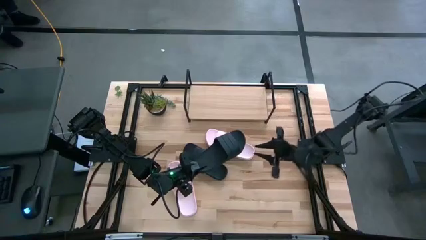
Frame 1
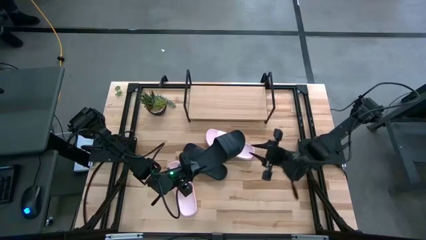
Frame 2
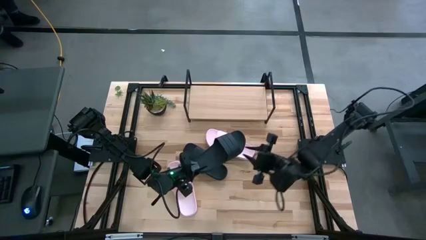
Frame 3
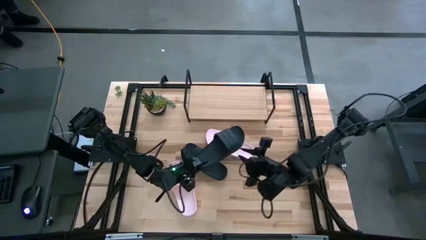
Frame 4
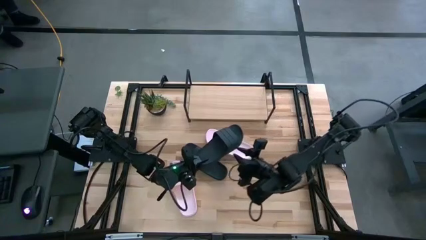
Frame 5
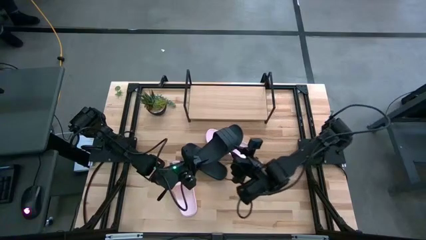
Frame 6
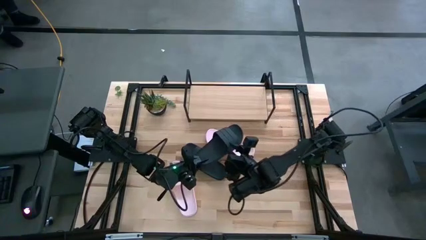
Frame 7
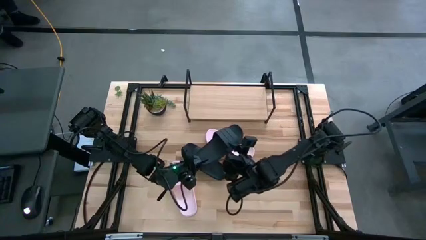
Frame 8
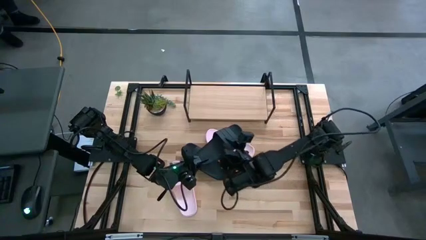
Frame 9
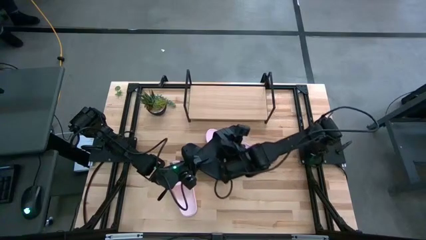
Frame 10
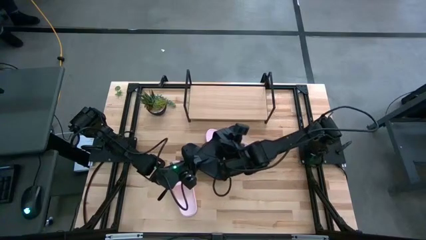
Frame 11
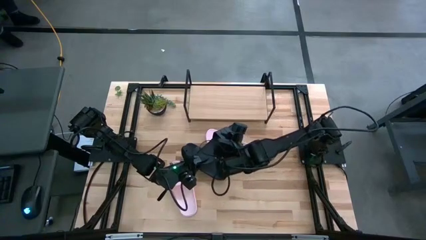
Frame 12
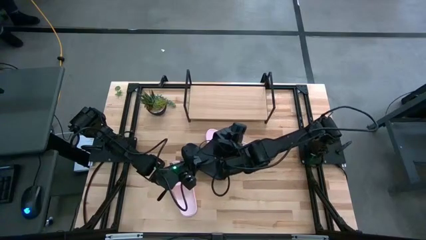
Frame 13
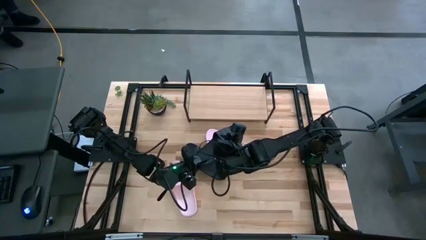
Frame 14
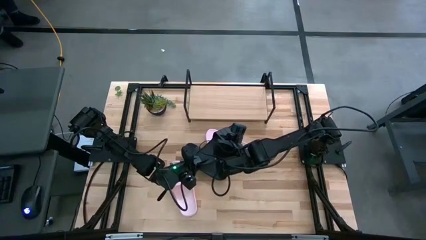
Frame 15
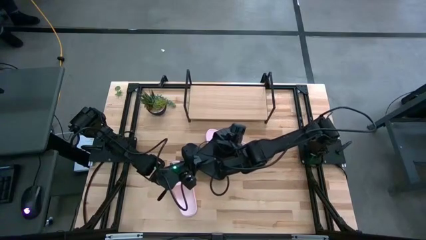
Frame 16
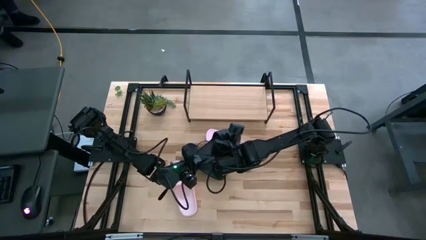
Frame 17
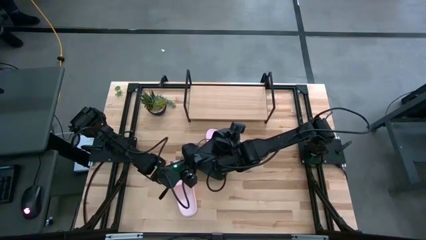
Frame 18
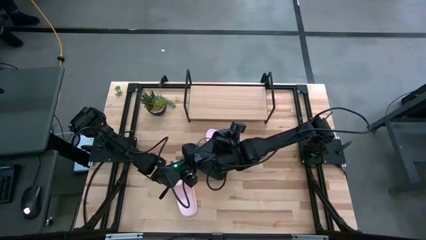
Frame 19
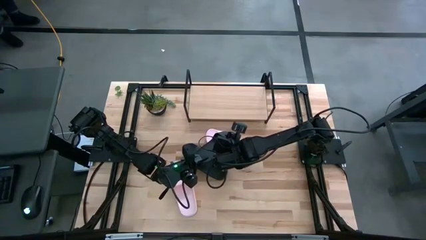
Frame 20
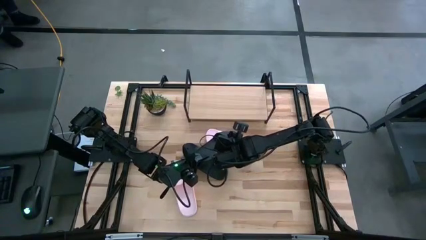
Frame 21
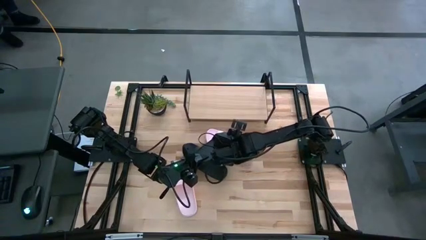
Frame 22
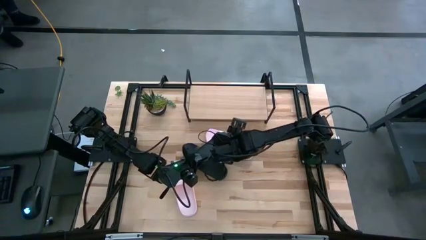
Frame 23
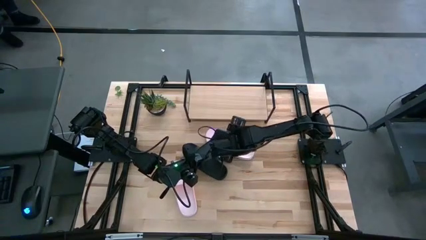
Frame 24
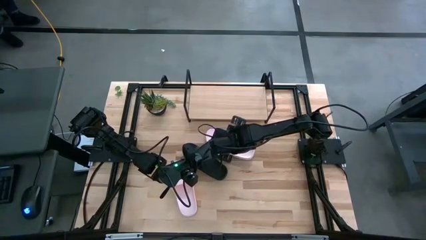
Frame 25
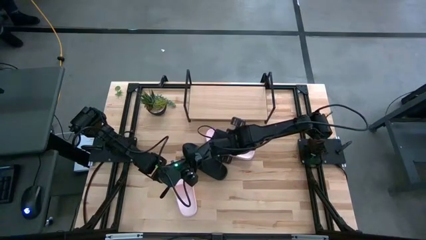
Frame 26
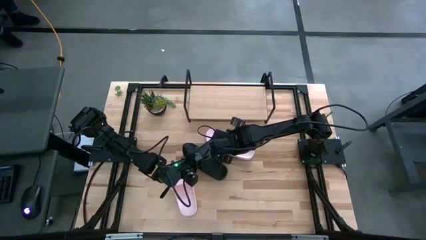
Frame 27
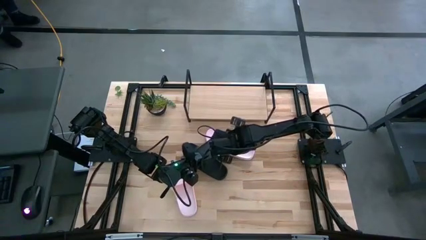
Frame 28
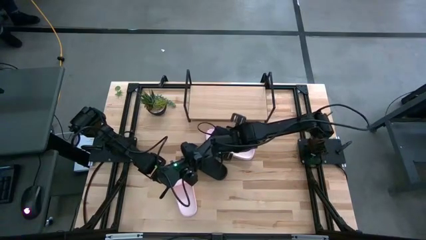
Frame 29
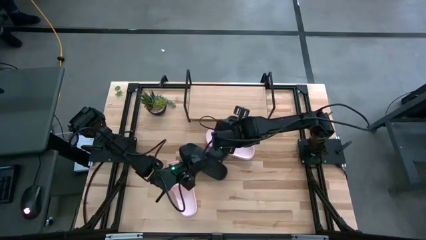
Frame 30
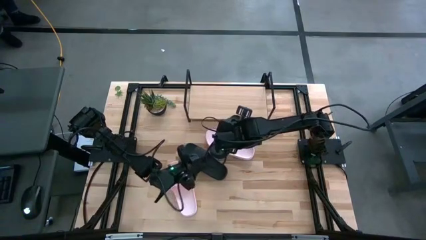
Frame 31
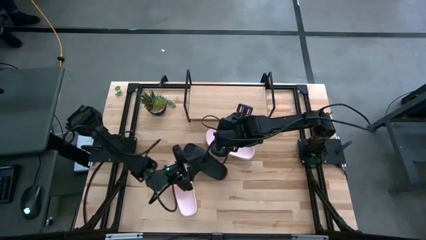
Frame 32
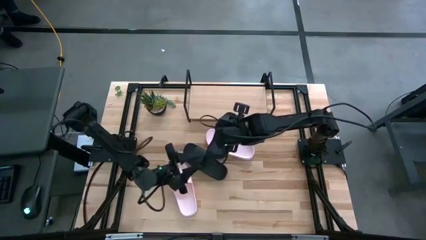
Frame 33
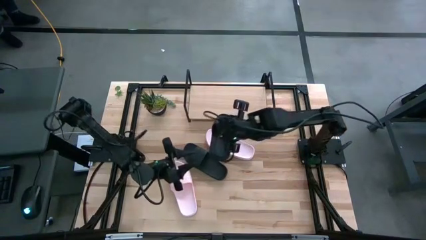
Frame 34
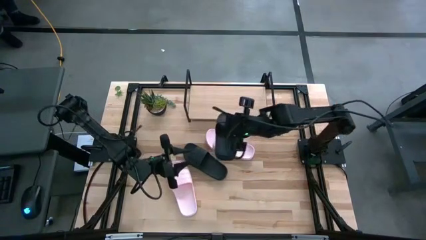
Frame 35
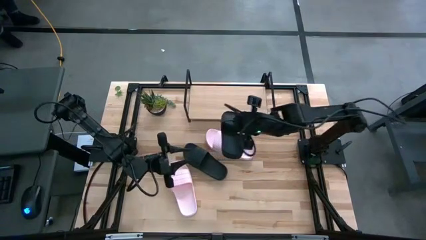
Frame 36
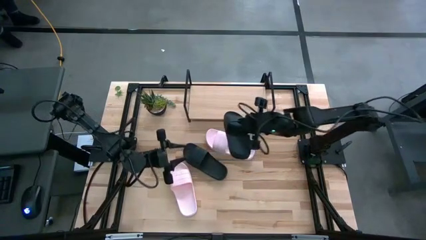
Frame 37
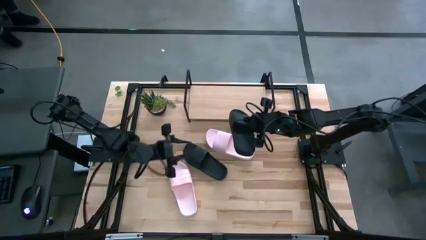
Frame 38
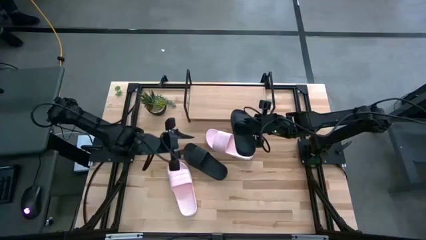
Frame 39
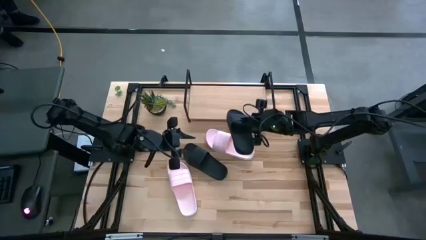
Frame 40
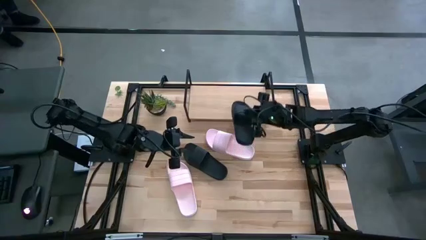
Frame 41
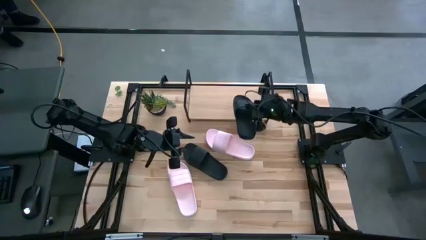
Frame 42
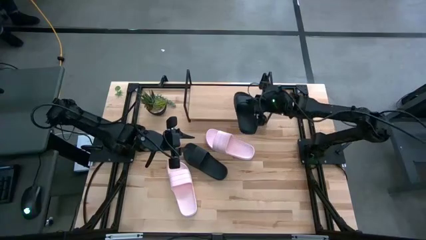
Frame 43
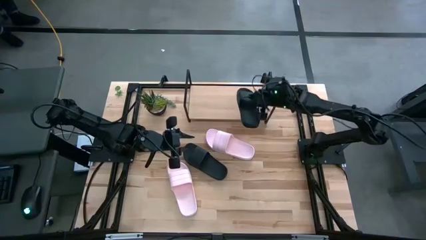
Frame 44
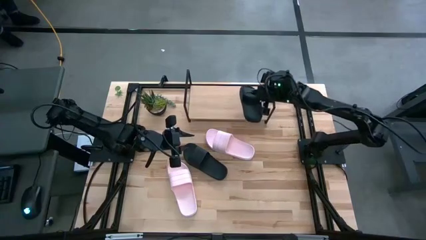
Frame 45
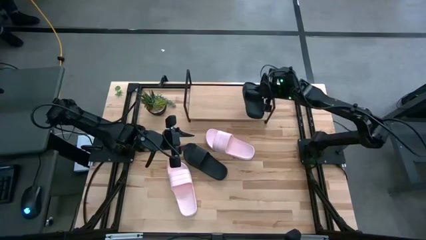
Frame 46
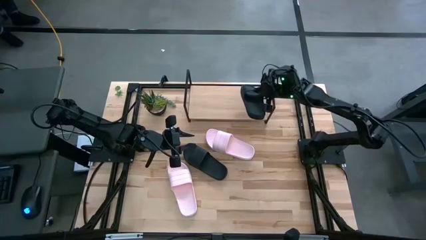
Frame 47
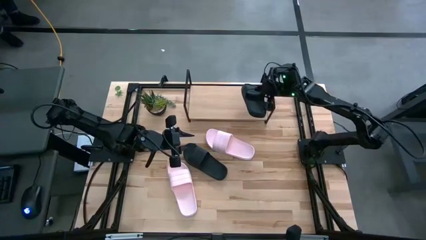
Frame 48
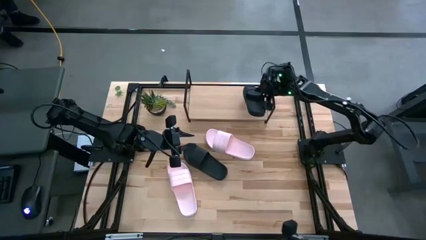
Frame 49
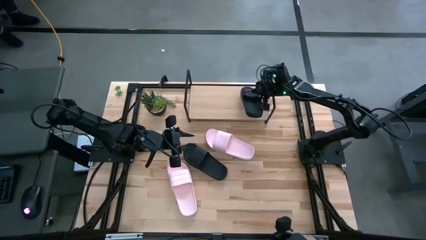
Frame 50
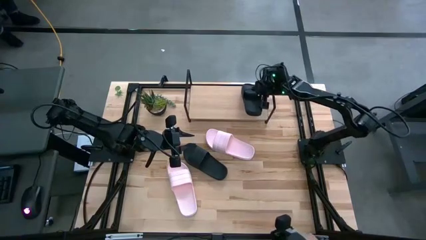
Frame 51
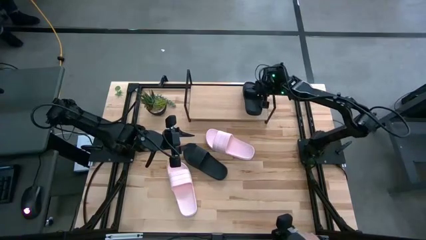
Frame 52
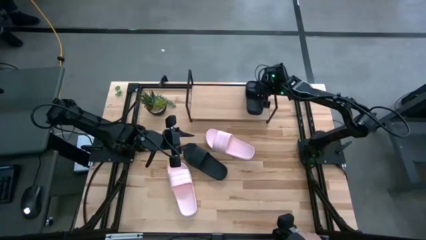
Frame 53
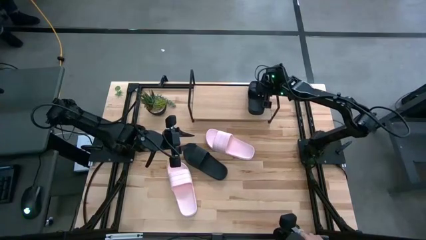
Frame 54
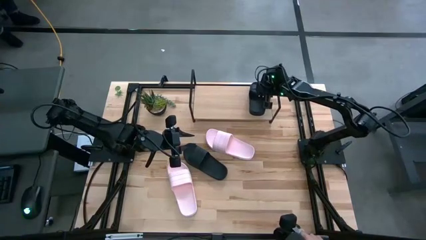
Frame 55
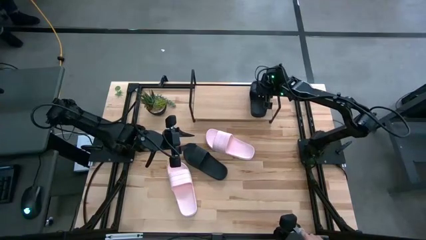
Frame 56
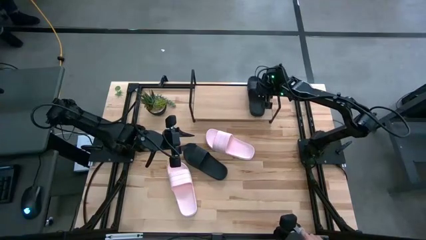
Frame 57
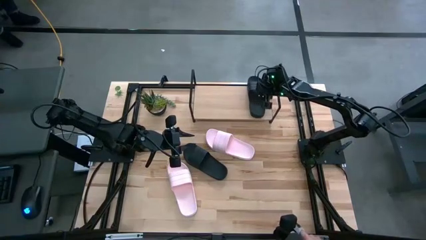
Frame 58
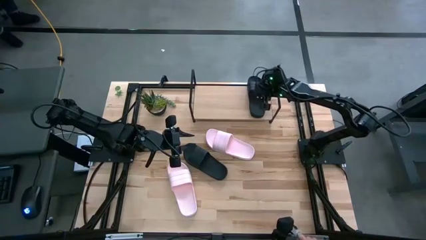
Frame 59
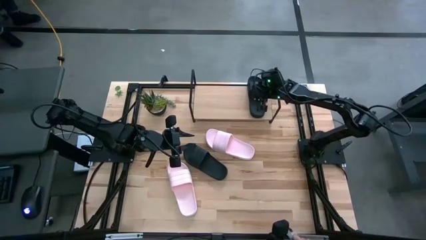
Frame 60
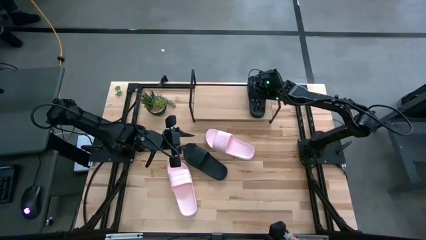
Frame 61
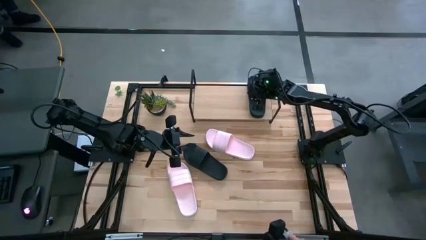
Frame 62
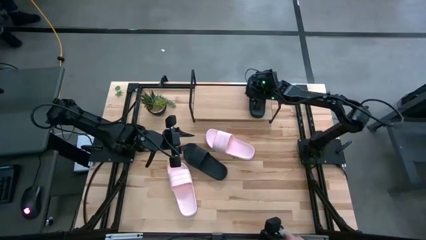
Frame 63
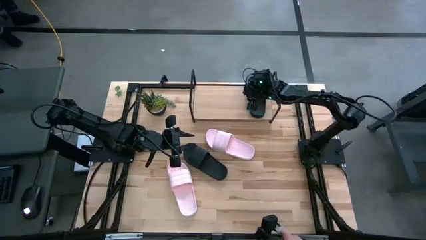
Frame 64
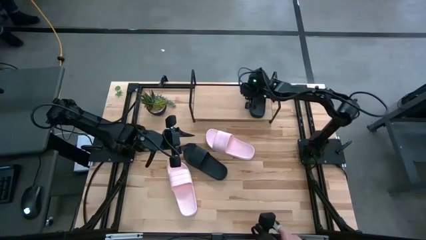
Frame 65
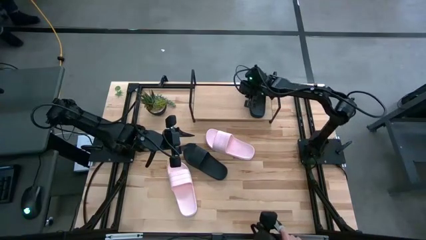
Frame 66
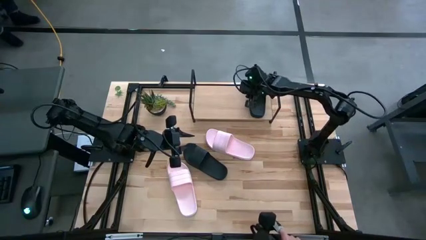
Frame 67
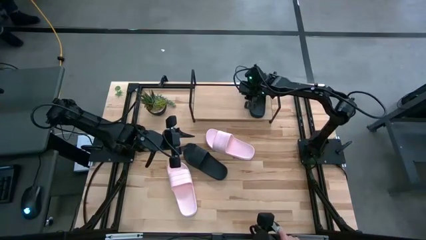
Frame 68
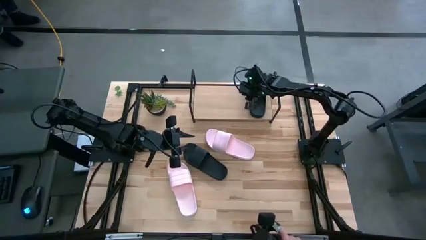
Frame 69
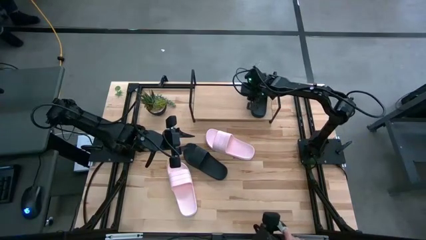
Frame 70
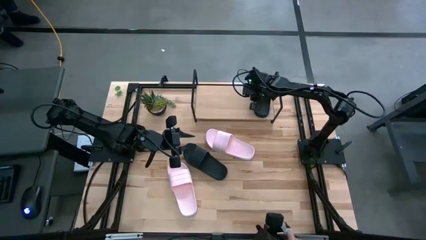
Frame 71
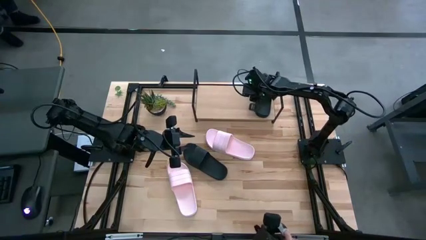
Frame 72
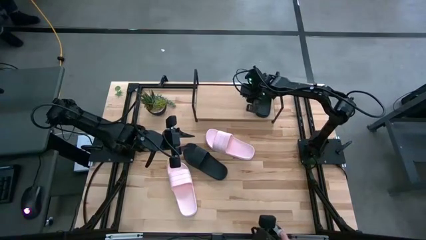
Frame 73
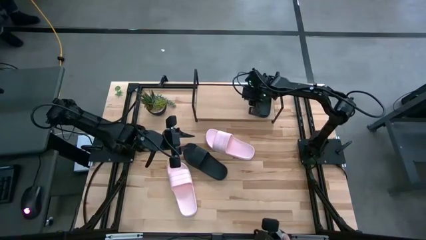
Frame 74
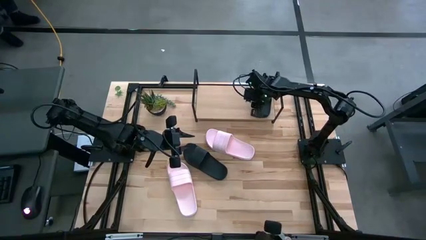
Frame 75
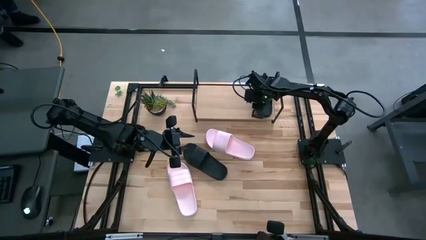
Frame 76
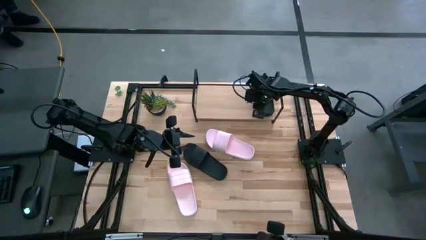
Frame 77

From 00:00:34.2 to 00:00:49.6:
Task: Pick and place slides into the shelf
Put the bottom black slide on the shelf
